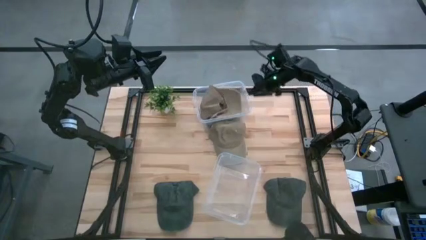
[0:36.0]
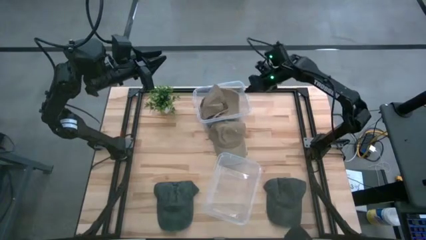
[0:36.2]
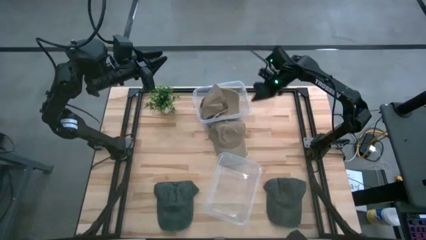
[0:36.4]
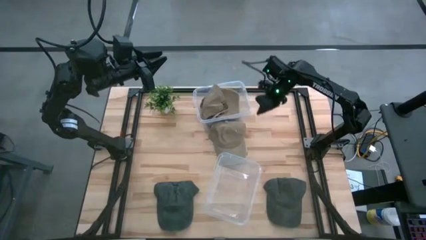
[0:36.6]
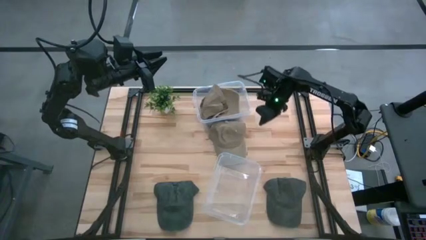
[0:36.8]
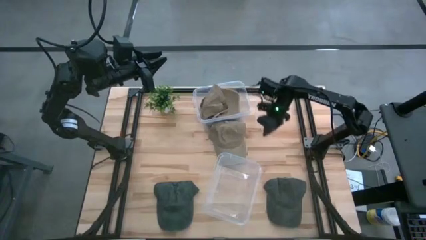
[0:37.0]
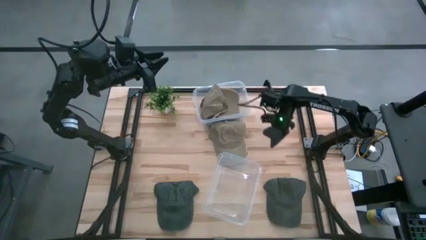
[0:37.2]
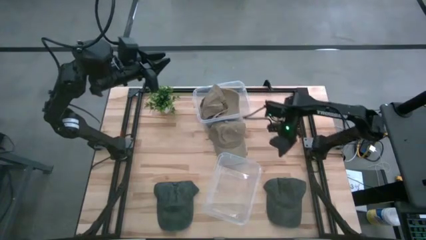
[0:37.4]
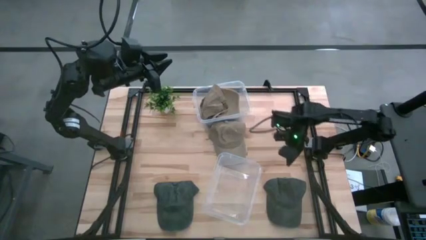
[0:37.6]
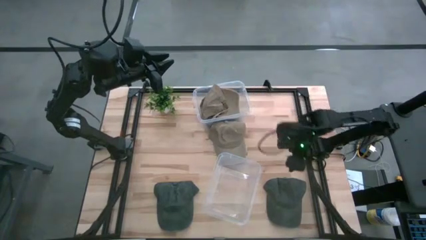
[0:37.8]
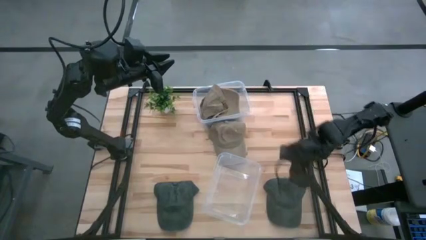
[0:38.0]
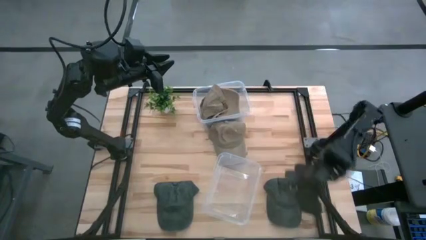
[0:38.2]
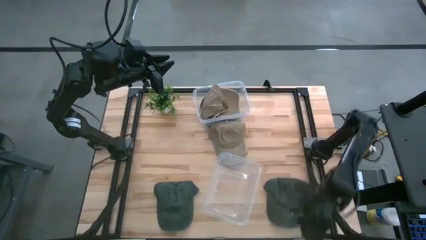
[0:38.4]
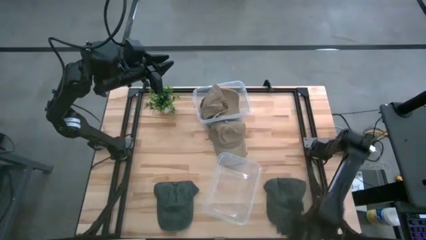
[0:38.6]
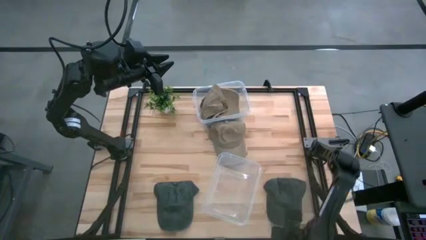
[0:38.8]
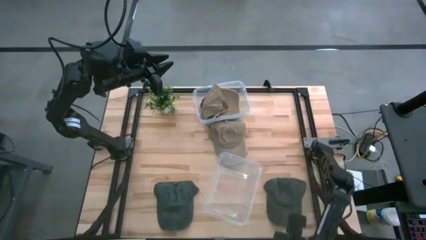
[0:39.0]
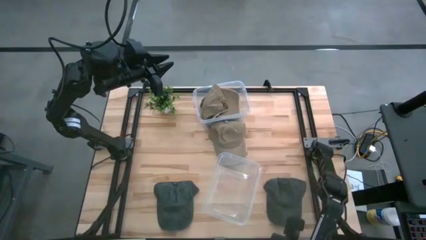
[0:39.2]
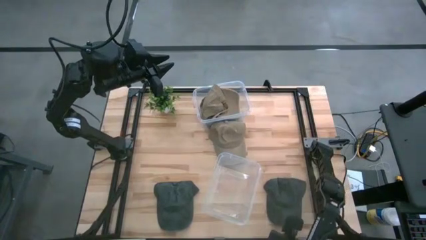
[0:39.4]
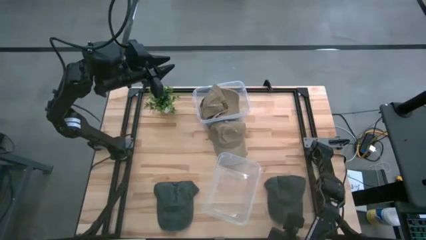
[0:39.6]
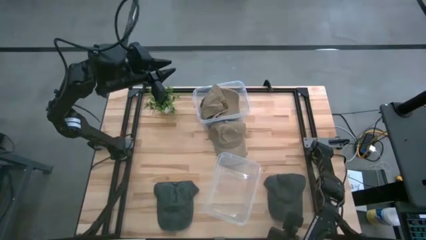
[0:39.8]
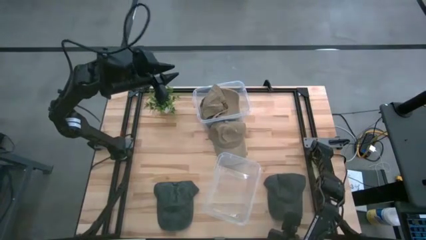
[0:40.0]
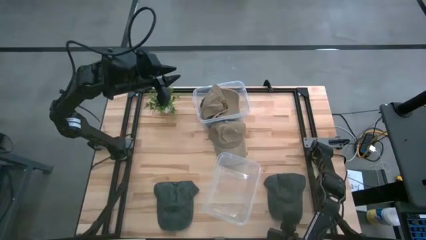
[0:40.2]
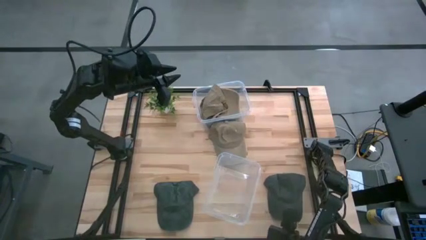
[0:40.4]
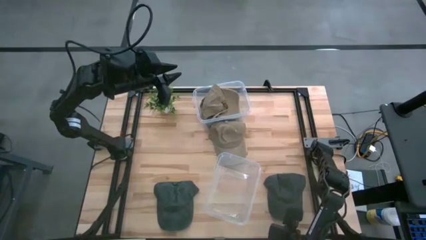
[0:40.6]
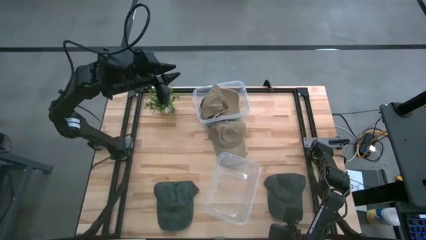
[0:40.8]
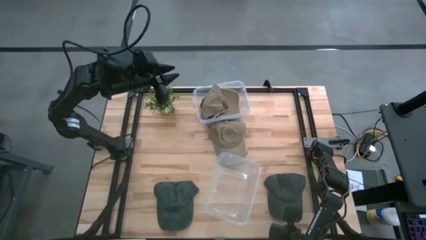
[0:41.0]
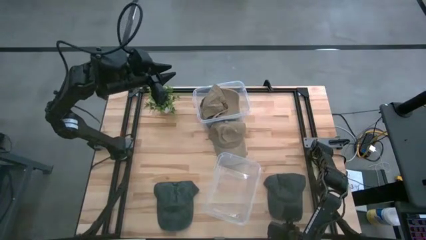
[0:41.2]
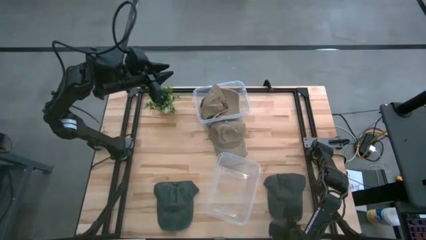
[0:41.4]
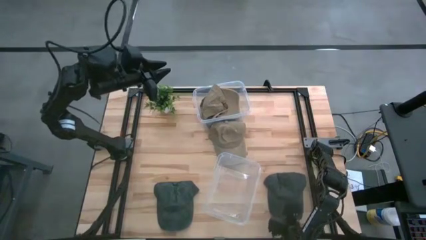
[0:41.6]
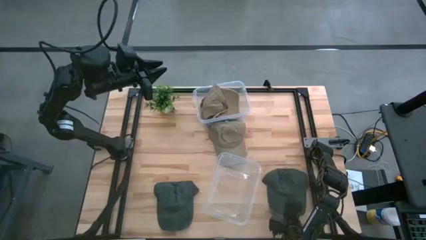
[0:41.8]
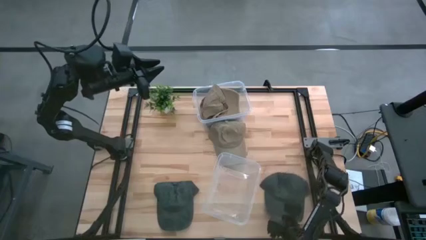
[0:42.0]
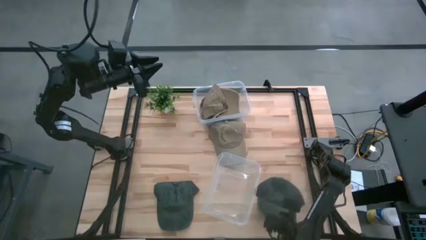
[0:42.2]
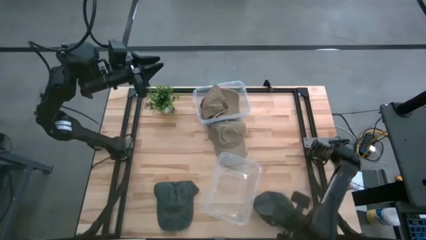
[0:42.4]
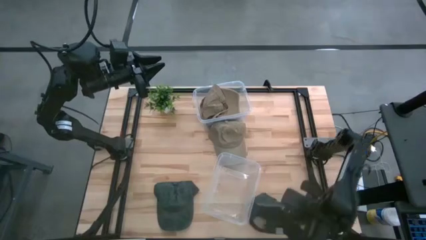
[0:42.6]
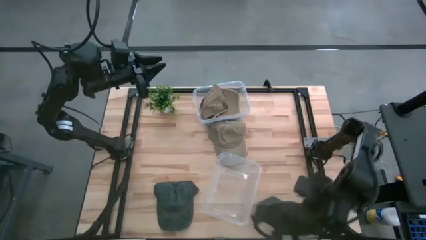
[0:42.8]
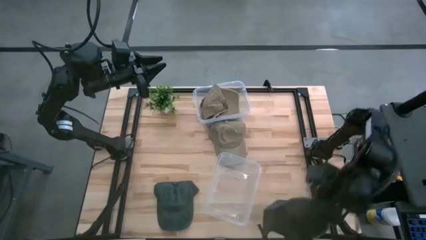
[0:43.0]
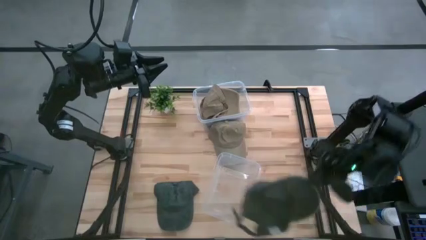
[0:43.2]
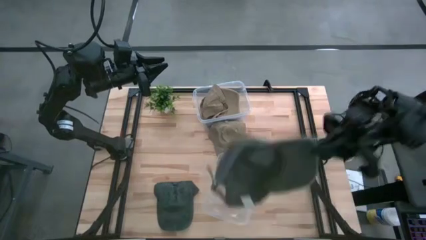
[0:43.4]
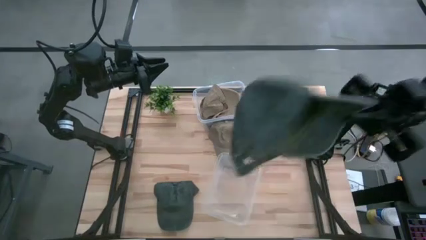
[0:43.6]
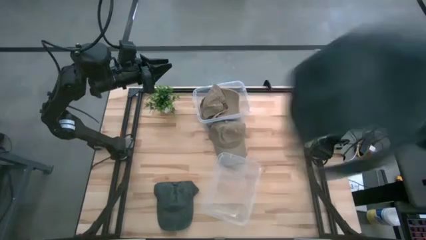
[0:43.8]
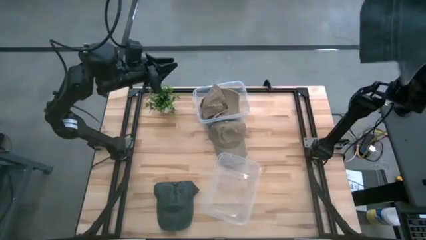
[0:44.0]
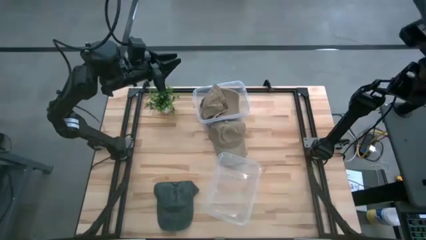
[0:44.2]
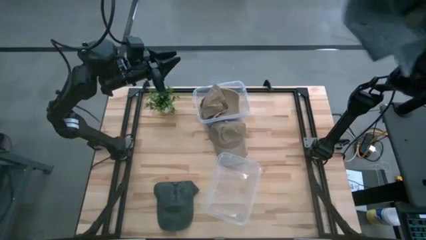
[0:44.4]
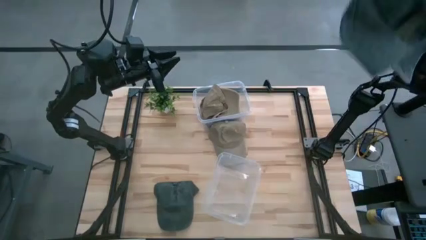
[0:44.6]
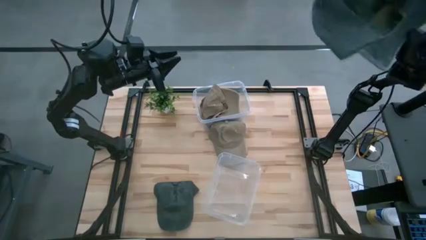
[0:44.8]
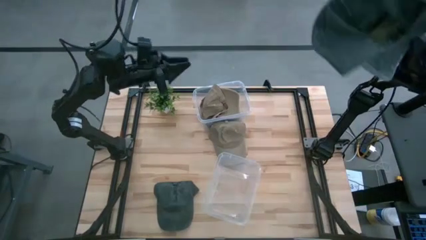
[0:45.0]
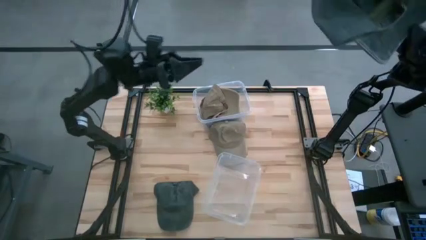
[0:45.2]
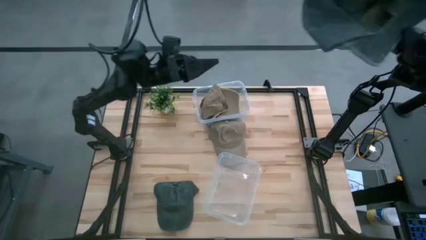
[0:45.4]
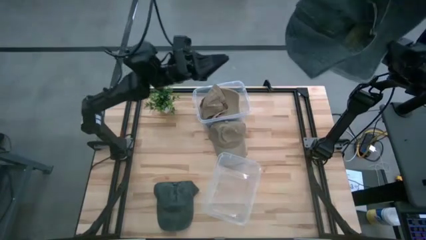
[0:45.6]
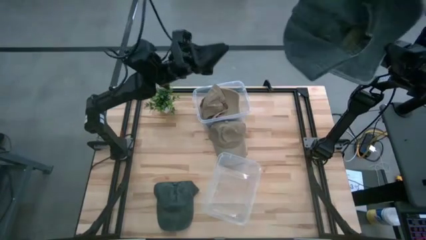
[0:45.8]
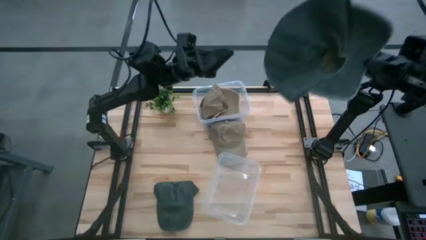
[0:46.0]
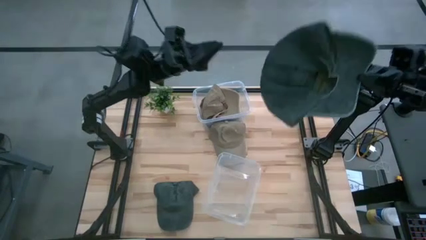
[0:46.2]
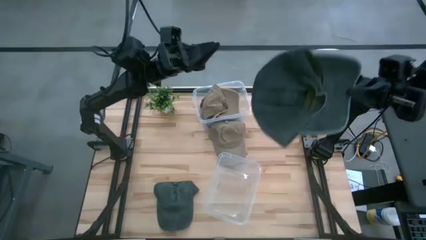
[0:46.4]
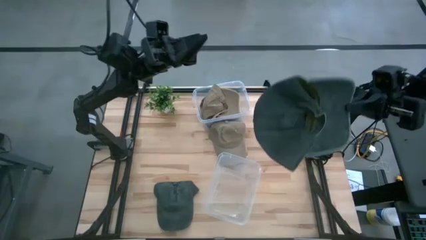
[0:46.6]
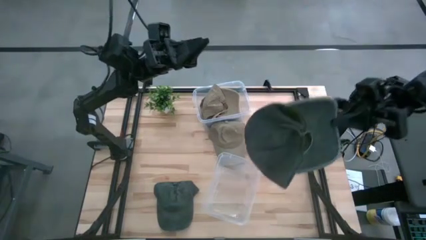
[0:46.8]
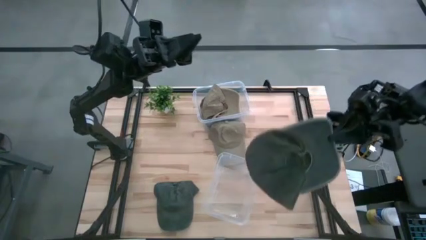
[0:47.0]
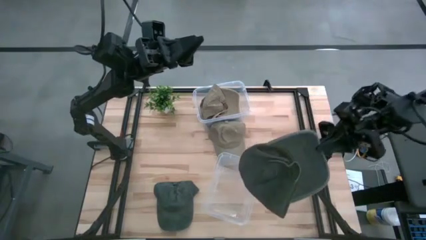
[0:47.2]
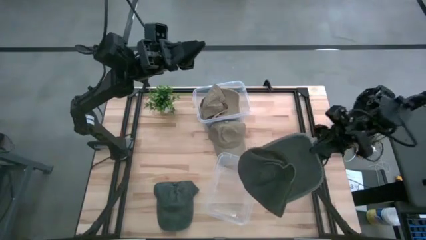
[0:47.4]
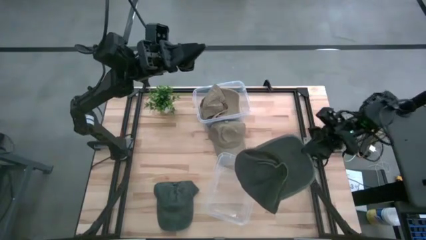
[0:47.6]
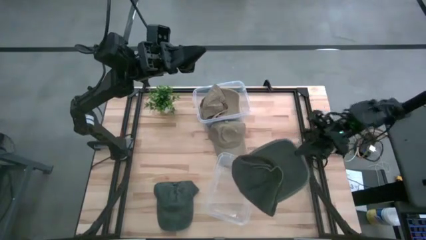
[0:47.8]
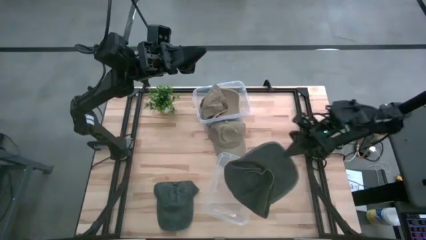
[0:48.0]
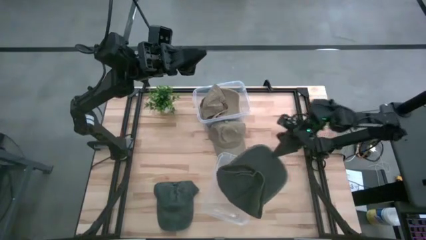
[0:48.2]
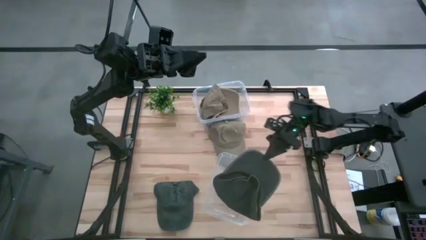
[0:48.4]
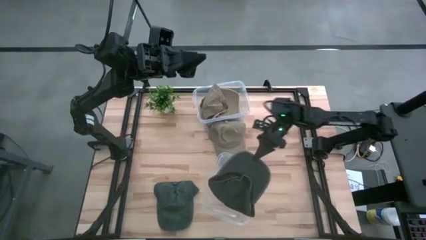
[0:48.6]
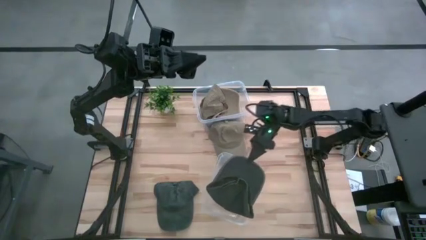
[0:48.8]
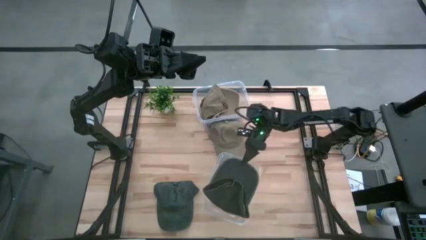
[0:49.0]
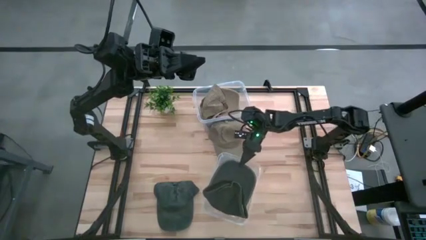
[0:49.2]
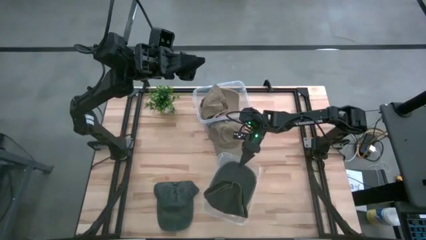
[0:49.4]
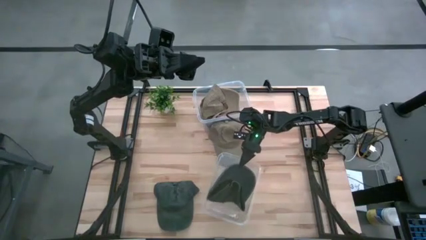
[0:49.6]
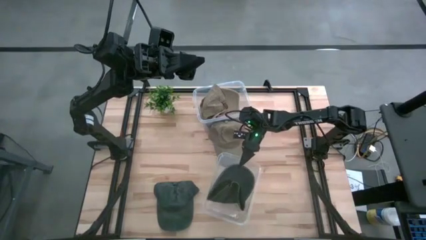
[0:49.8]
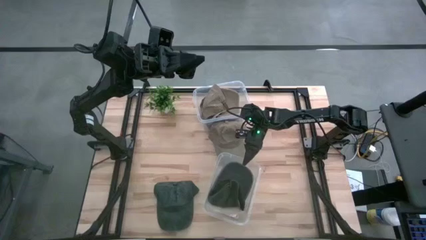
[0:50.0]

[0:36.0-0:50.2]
Task: Pick & Place hat
Put the right gray cap into the bottom transparent container

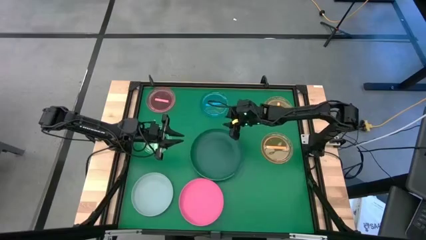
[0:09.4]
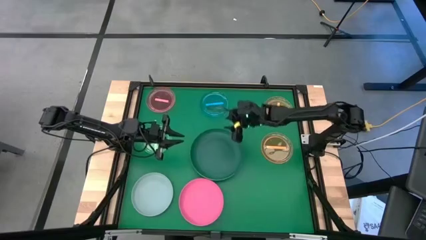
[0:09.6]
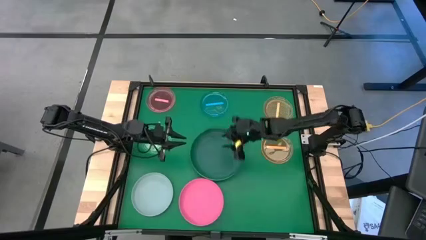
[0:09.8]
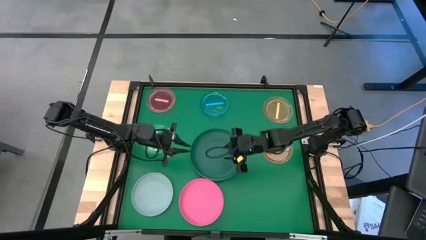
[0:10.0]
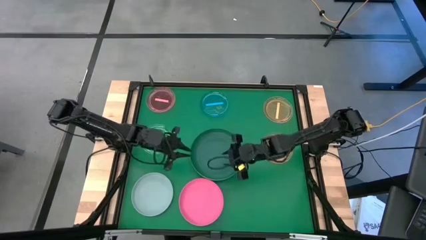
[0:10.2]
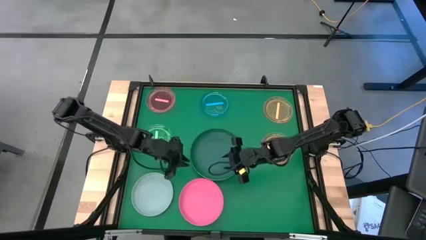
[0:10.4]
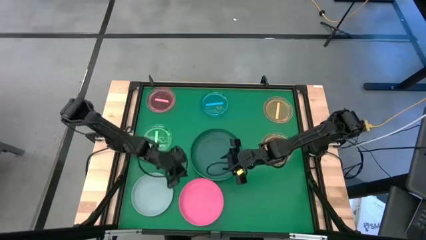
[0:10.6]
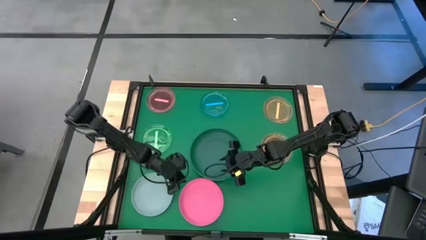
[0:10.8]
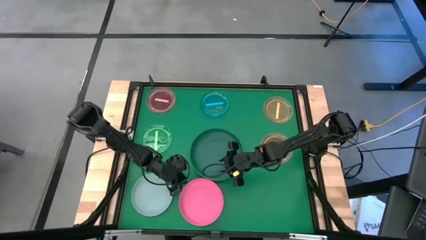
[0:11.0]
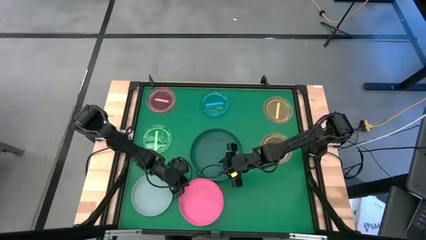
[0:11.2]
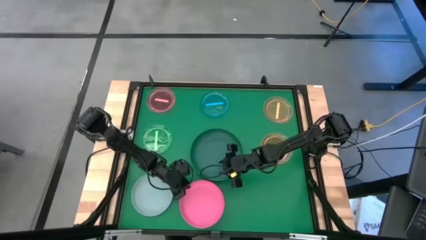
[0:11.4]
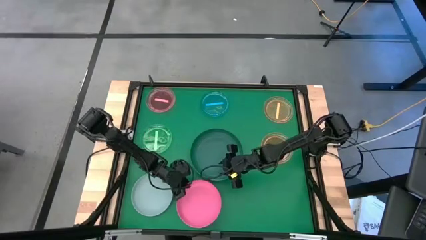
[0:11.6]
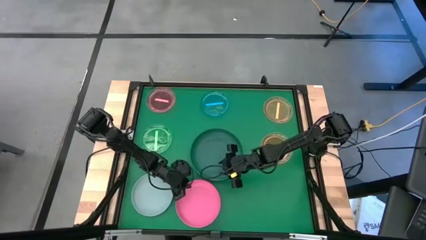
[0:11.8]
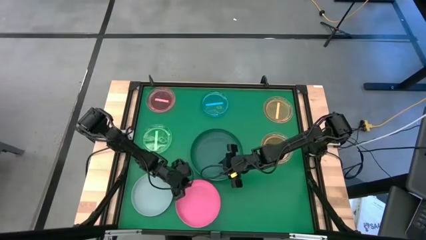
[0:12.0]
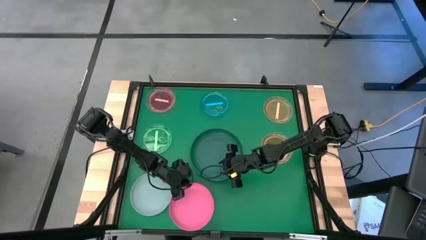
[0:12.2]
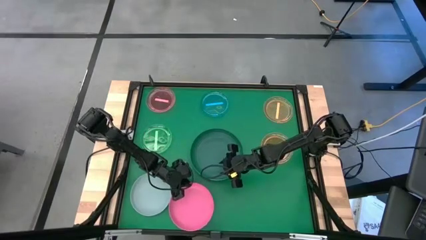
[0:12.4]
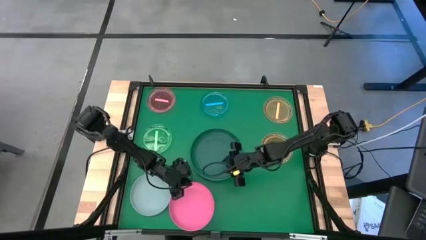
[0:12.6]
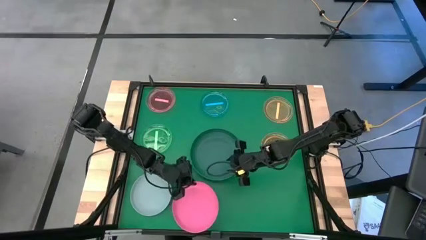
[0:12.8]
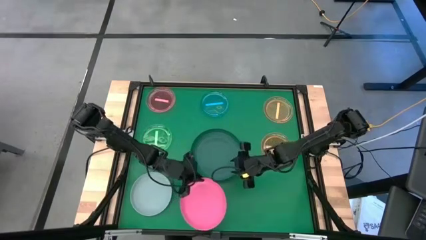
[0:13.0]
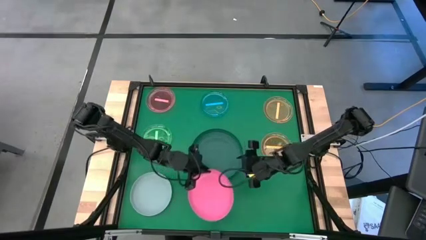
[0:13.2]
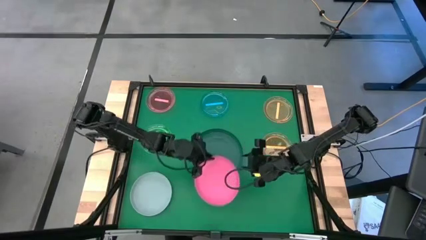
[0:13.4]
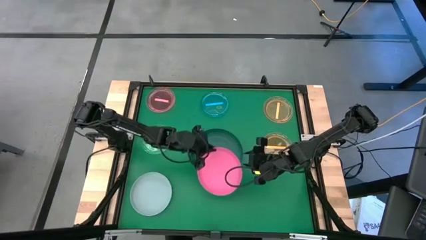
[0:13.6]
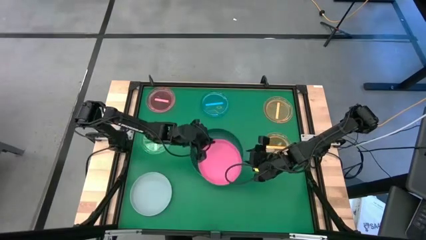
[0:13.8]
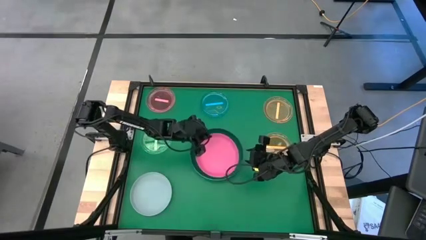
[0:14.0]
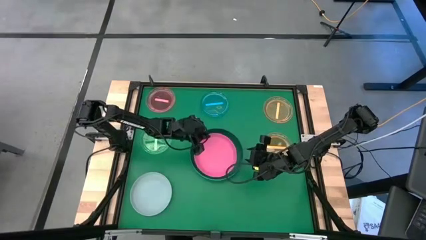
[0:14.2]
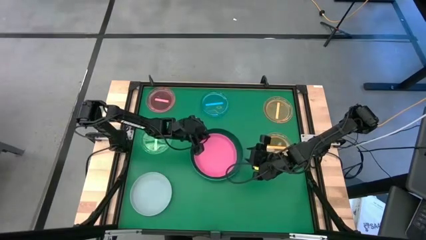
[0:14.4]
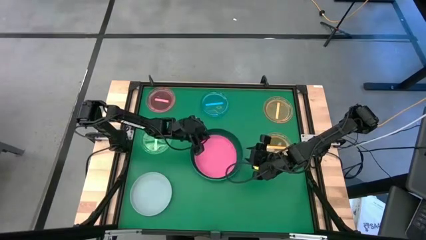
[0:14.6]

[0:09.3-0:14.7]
Task: Stack plastic plates
Stack the pink plate on top of the dark green plate
